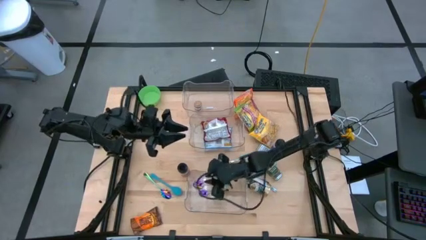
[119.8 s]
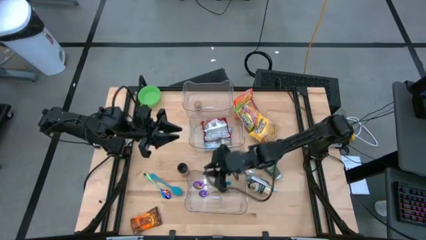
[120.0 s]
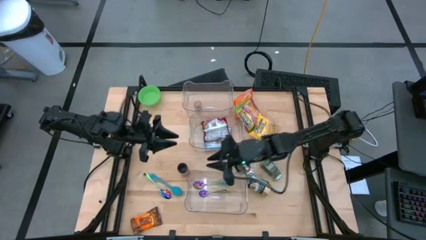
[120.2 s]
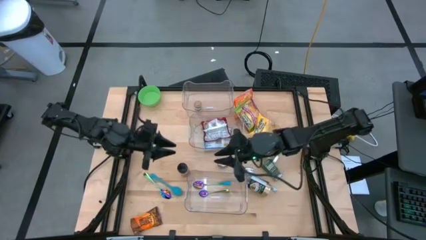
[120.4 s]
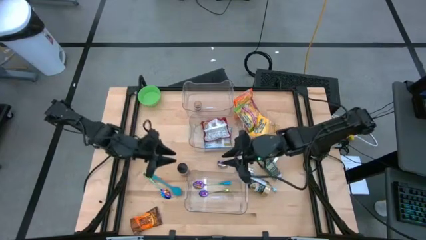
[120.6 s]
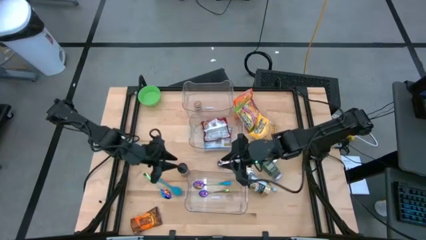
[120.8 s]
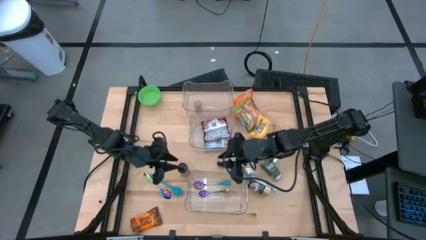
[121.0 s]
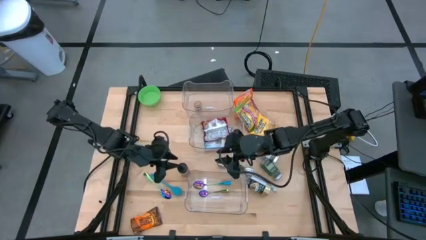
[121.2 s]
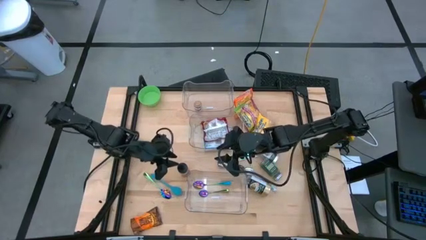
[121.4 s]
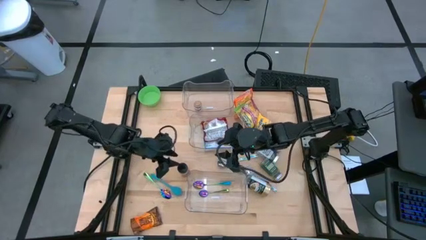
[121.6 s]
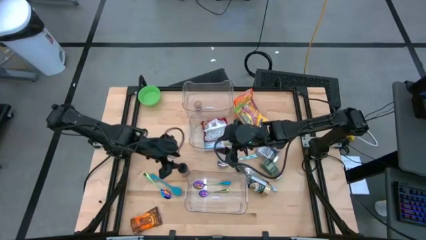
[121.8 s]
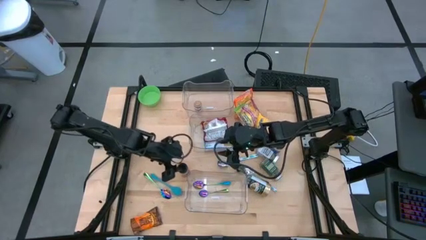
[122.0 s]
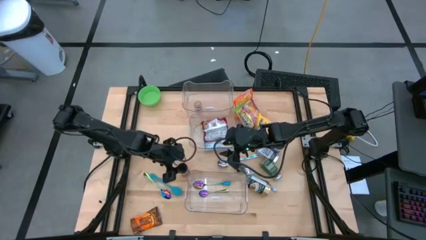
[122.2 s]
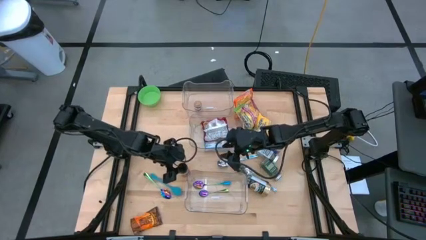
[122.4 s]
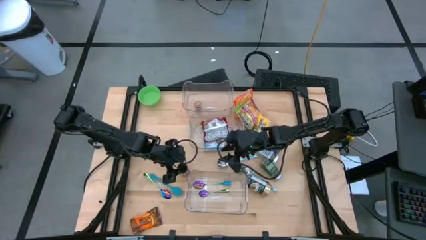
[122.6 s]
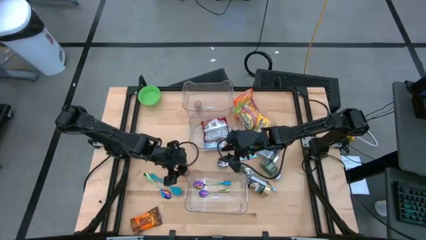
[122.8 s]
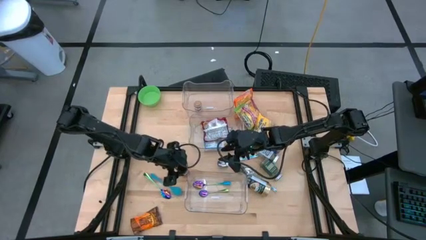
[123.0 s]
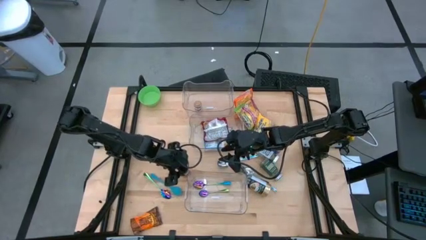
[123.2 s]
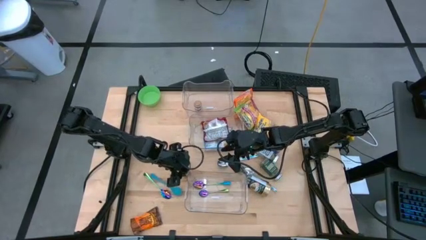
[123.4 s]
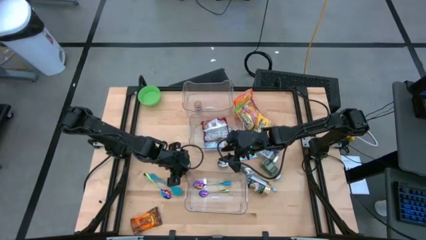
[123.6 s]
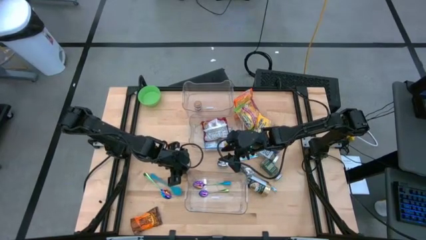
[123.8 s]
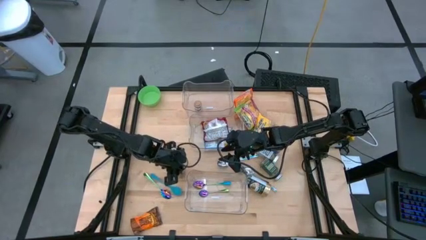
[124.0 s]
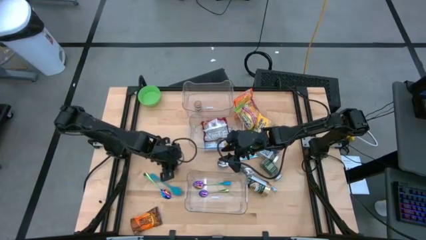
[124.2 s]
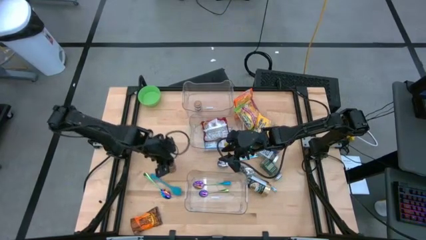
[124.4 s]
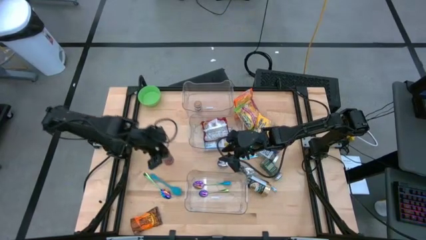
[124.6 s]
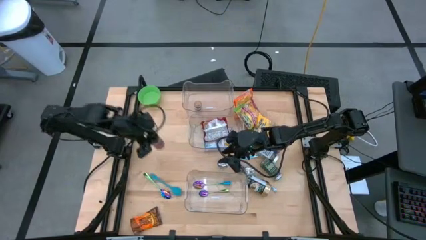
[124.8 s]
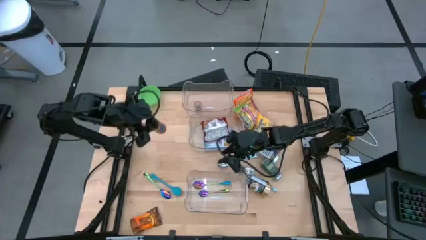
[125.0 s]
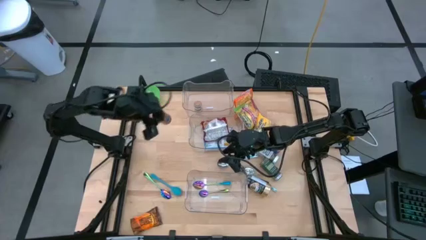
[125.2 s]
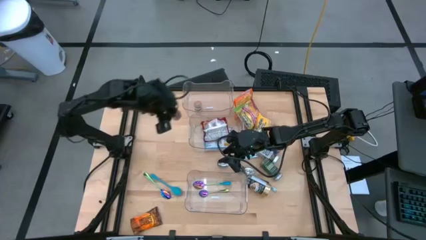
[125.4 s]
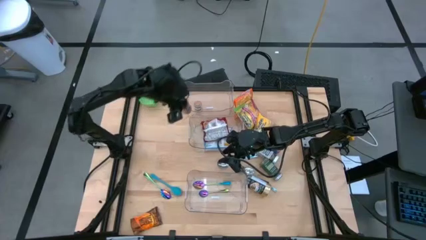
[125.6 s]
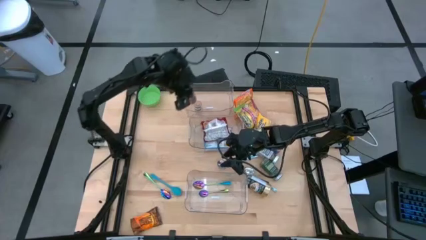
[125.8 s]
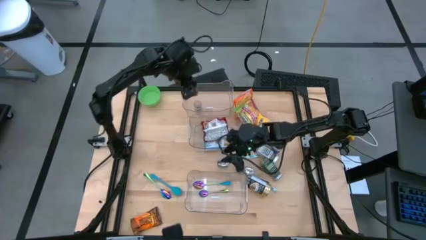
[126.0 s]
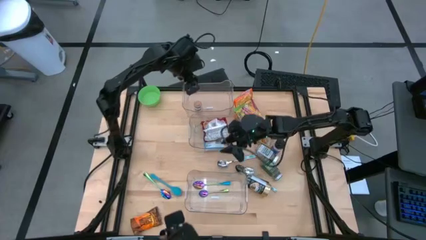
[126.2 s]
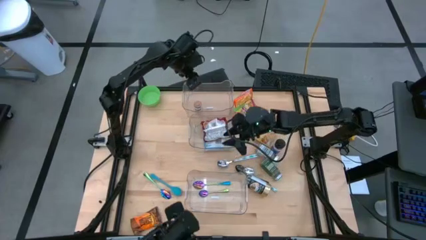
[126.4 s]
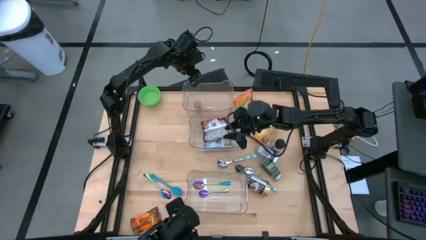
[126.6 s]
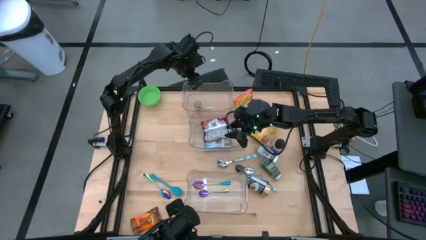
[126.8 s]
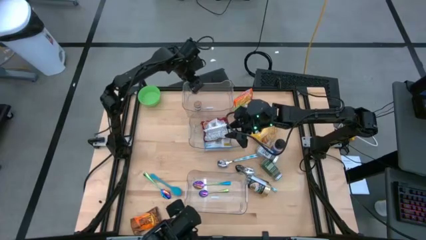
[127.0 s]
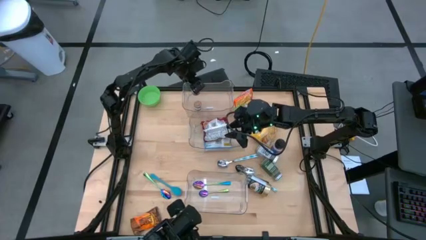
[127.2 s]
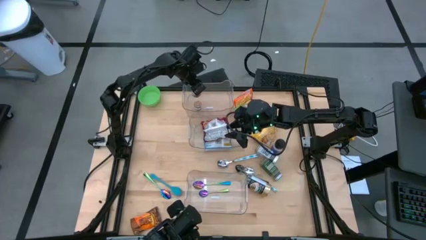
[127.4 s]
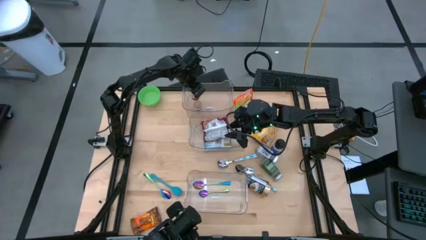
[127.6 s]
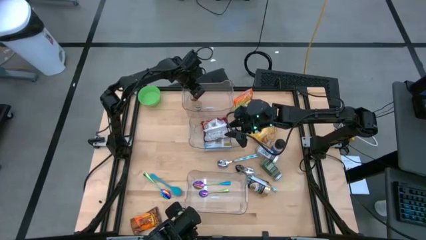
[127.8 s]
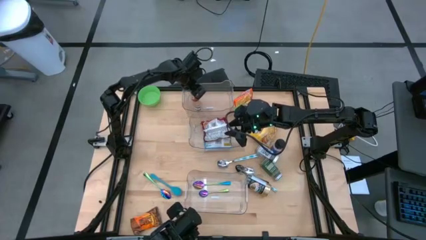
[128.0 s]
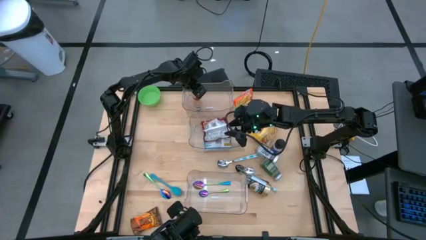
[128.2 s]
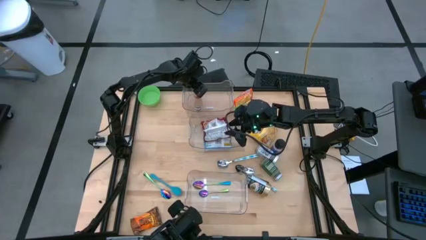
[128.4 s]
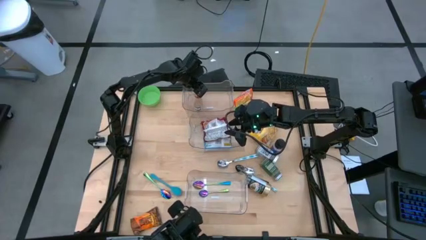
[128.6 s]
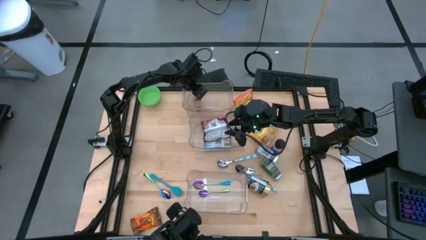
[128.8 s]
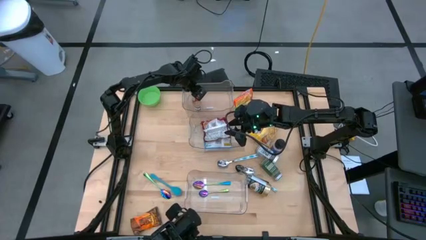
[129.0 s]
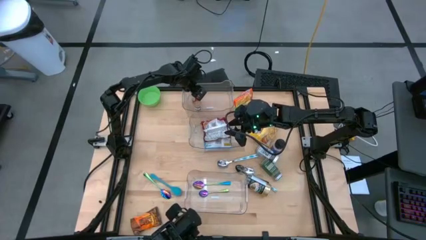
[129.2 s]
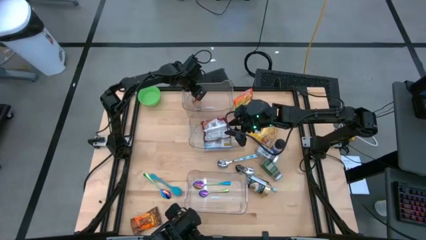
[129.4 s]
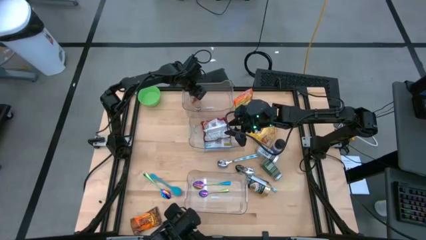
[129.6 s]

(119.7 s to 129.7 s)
Task: Pick & Place Food Item
Put the orange seasoning bottle into the top transparent bin

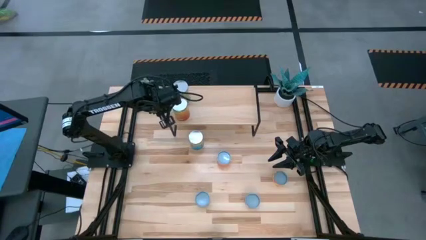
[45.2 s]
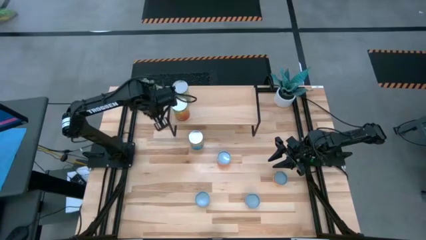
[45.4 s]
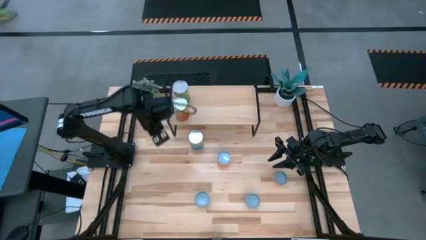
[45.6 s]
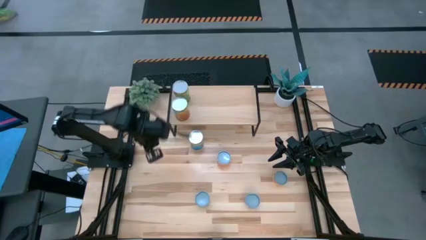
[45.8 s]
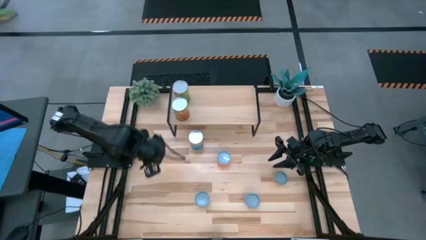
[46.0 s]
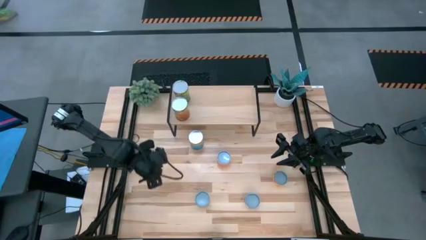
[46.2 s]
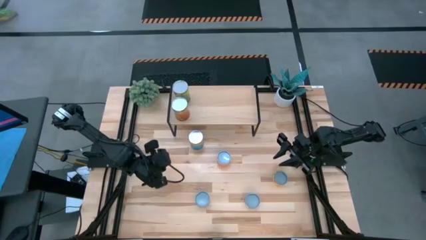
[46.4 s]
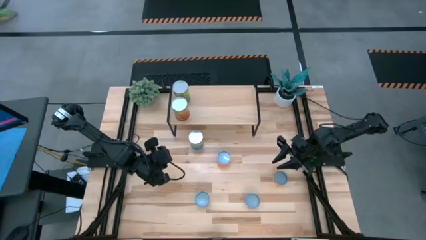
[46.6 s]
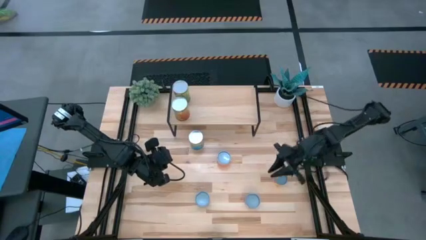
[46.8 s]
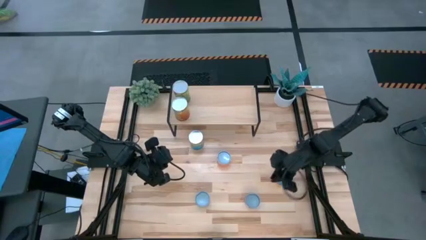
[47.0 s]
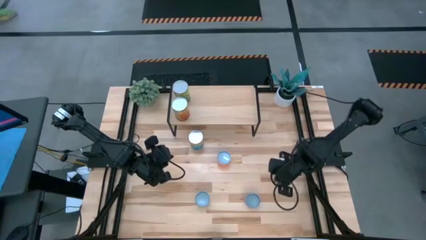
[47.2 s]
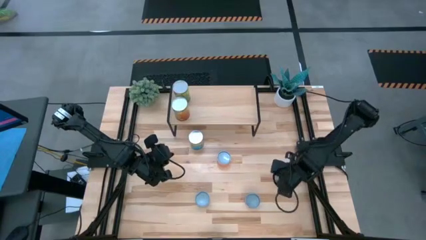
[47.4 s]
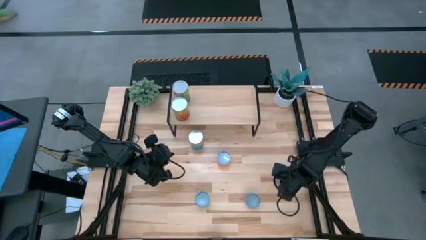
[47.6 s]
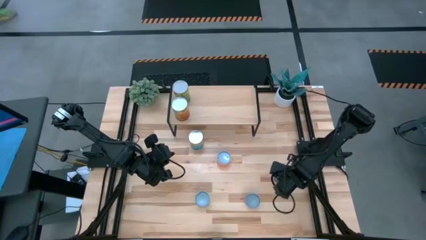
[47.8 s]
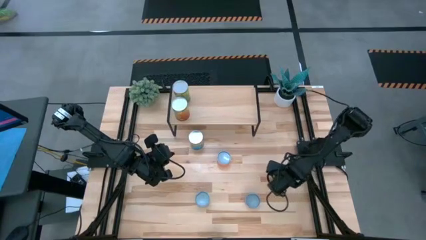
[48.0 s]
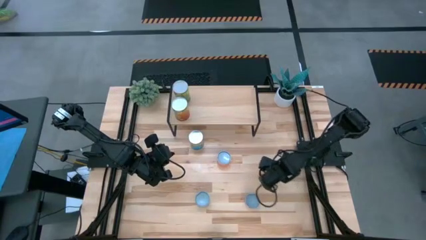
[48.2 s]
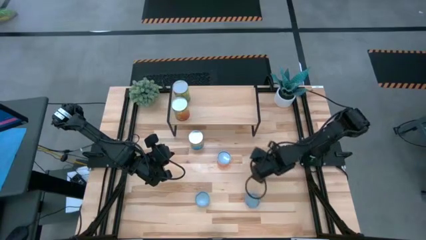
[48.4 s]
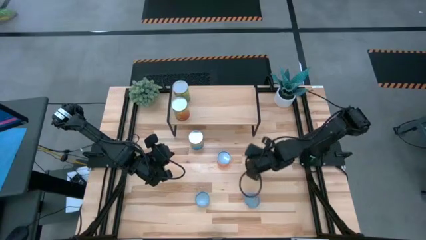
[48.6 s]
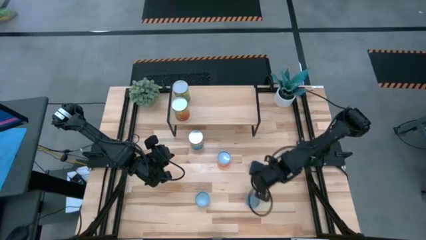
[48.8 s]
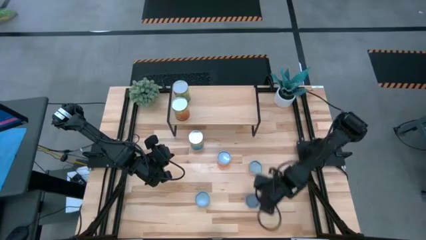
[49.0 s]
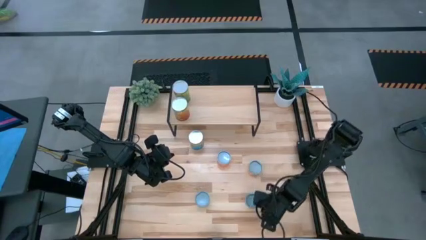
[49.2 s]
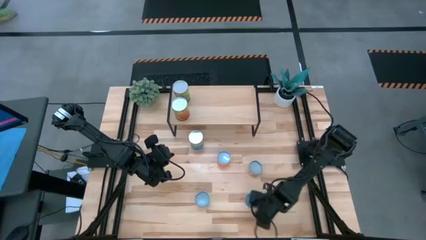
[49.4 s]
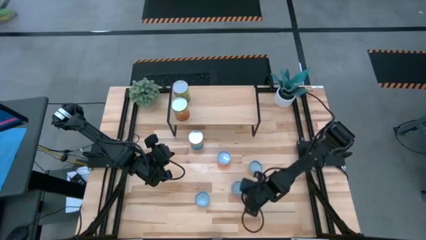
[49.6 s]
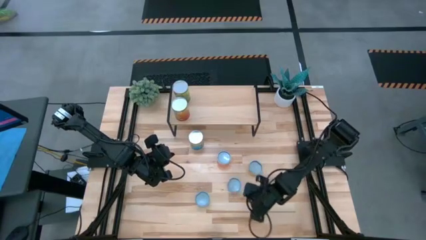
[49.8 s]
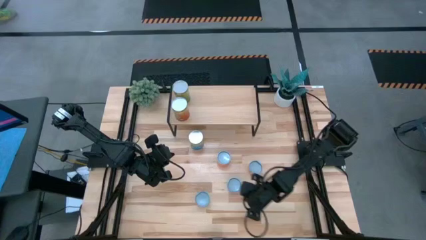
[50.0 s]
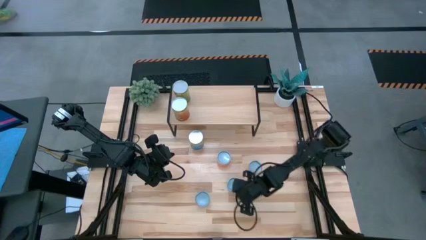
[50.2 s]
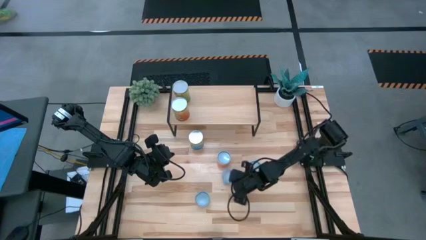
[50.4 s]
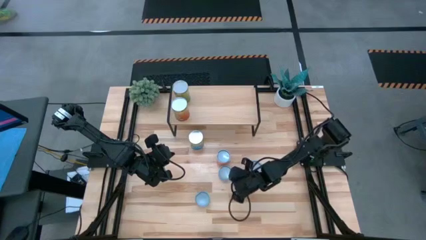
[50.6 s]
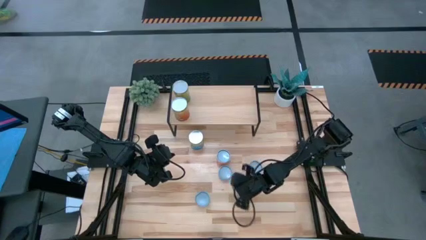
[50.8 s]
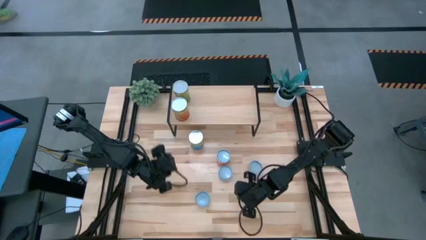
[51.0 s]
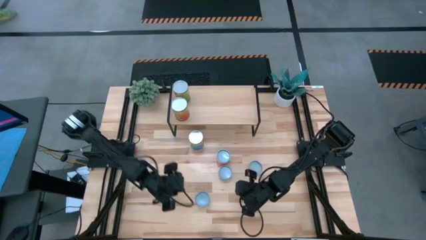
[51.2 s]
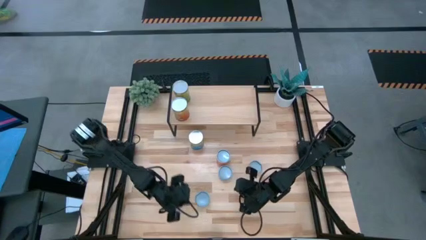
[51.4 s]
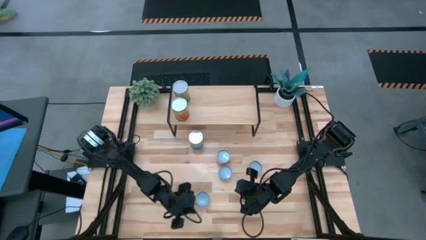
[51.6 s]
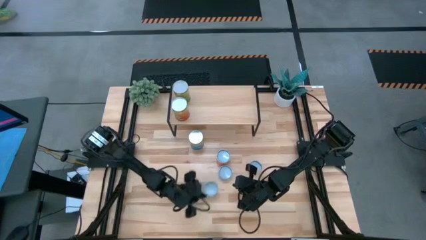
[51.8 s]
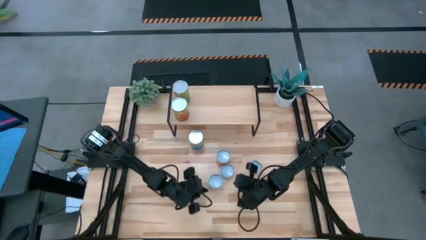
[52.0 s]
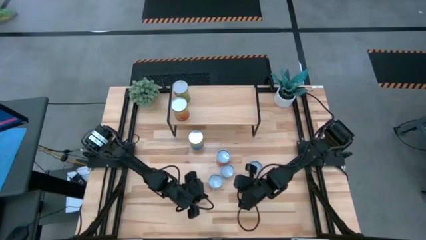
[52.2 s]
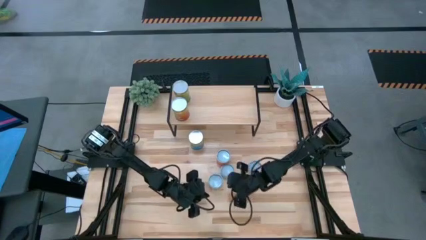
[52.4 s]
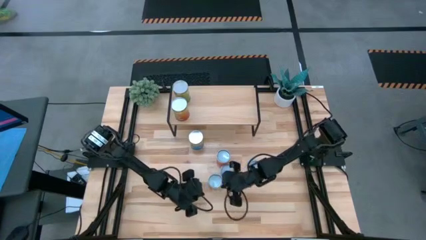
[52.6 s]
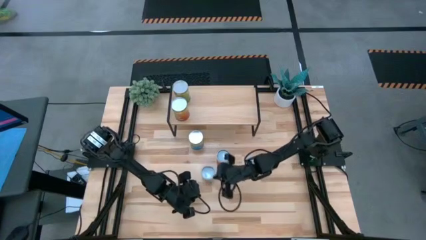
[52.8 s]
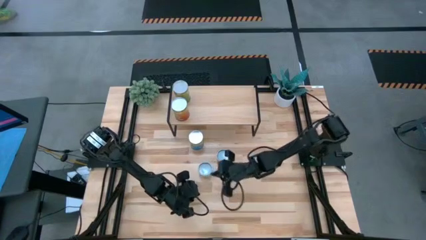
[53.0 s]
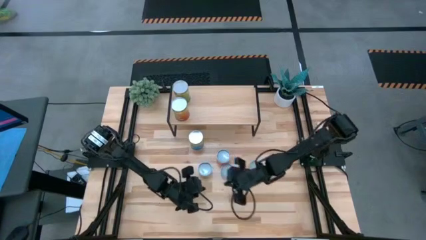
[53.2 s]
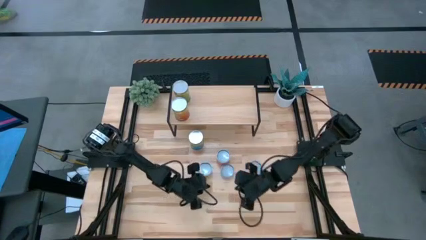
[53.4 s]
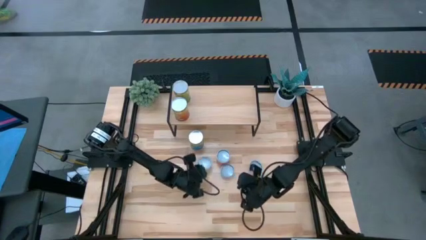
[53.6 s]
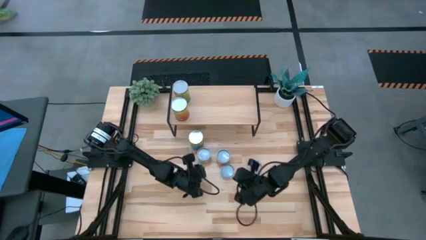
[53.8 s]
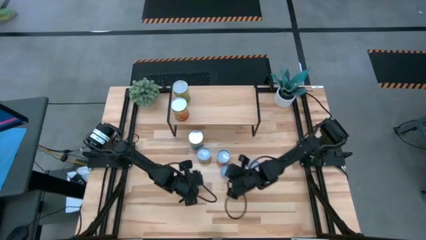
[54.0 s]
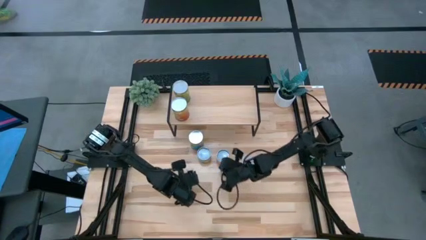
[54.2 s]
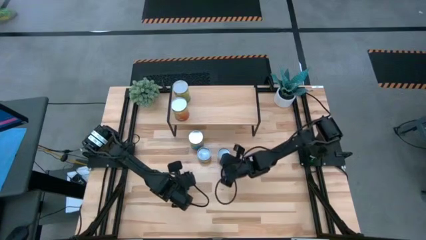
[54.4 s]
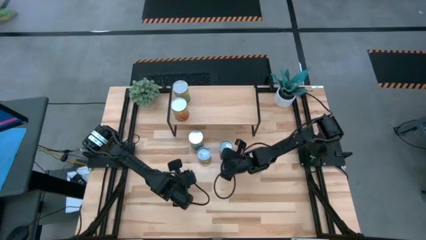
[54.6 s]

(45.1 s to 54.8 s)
Task: Pick and place cans onto a shelf
Prepare the canned goods on the table
